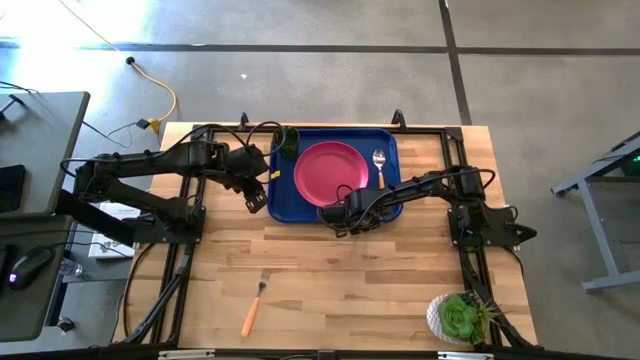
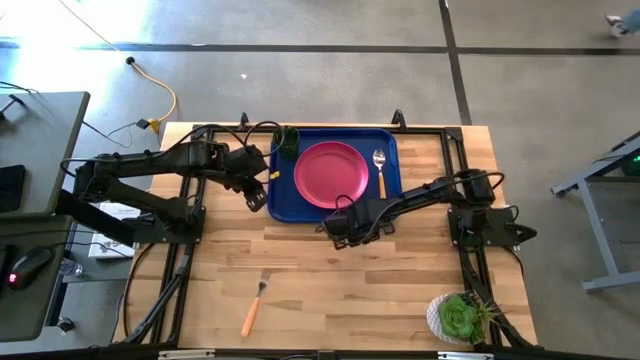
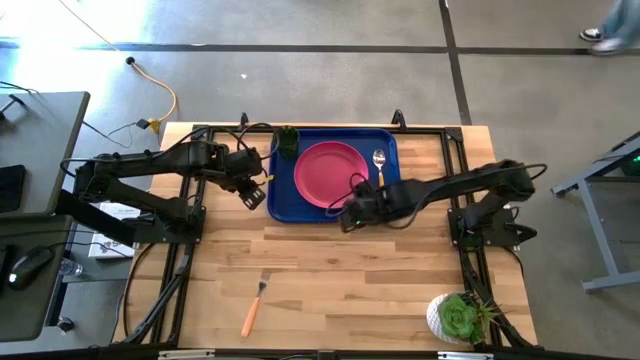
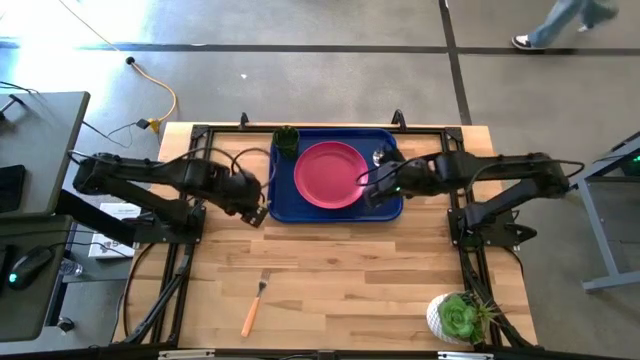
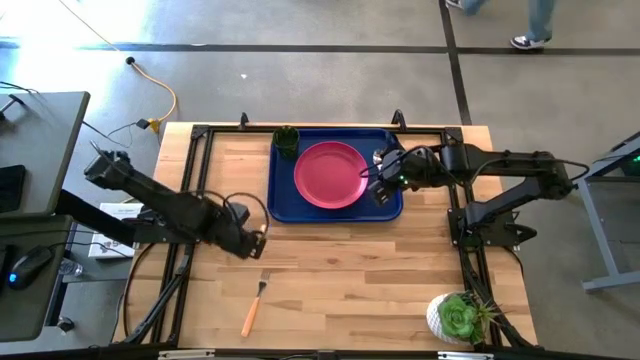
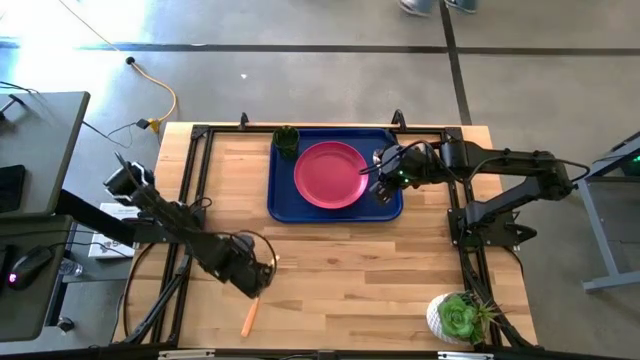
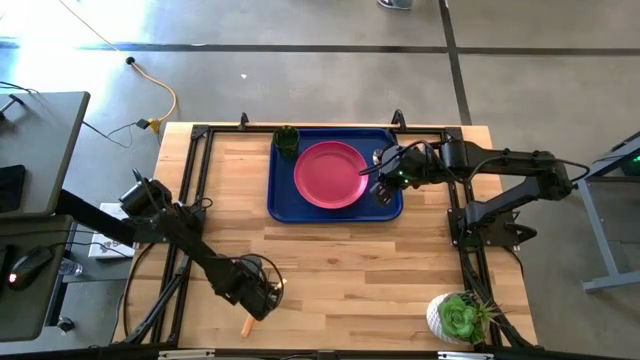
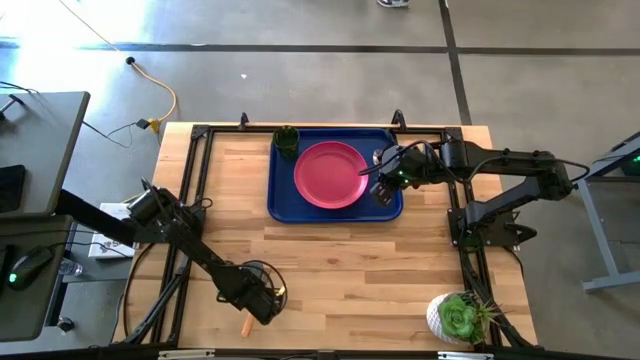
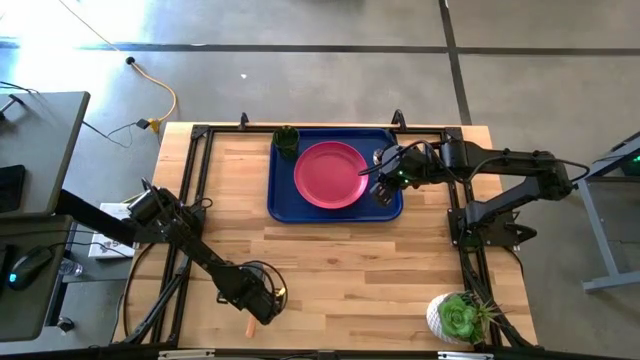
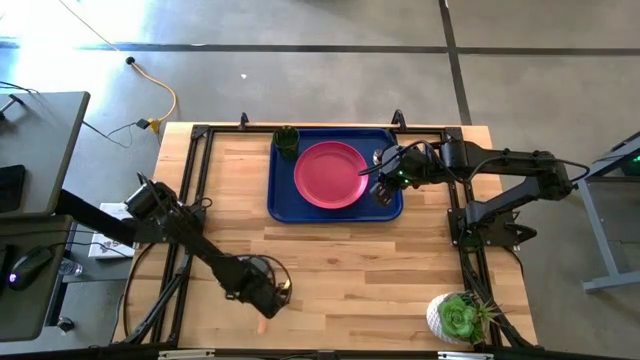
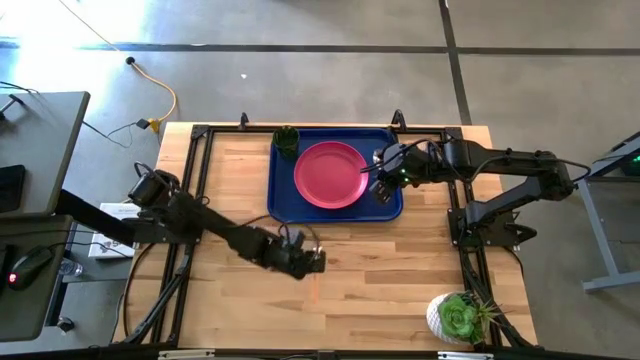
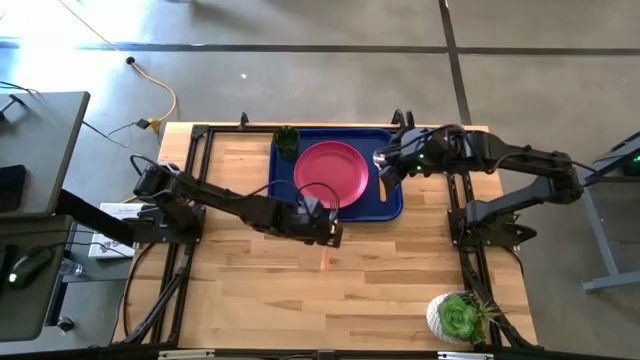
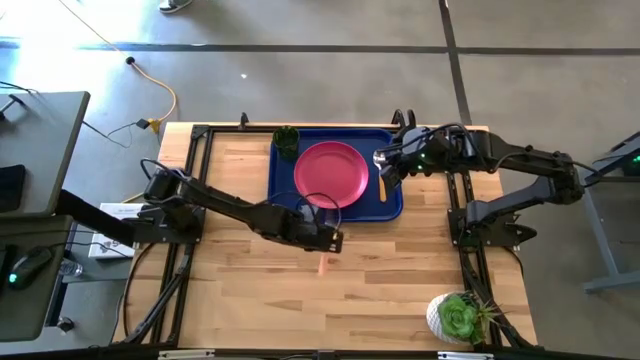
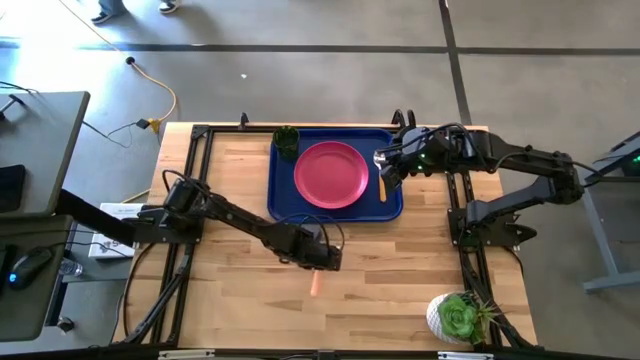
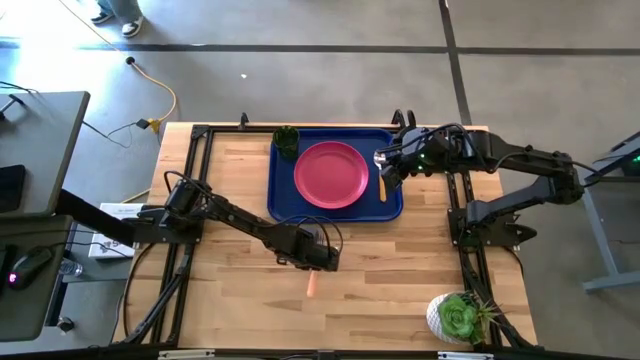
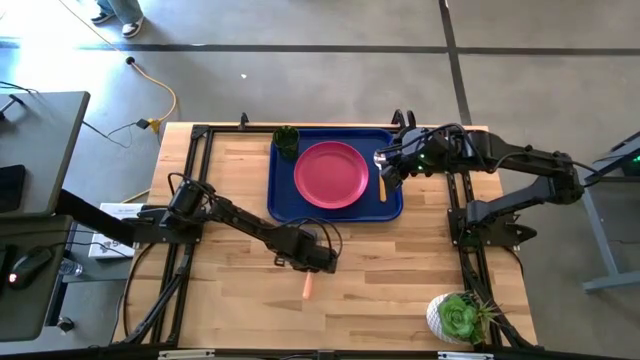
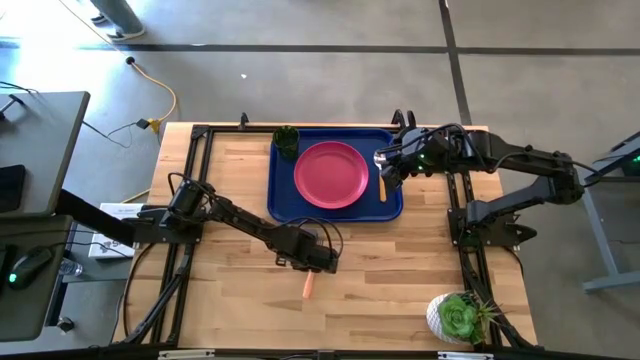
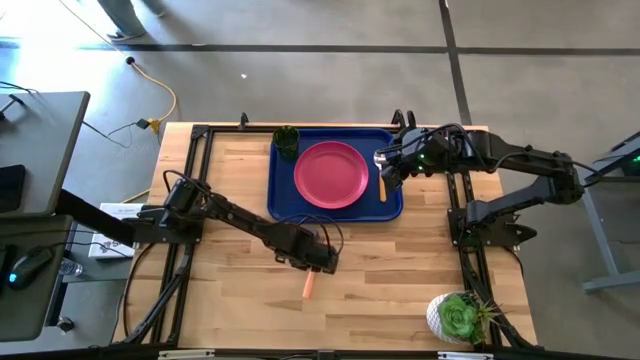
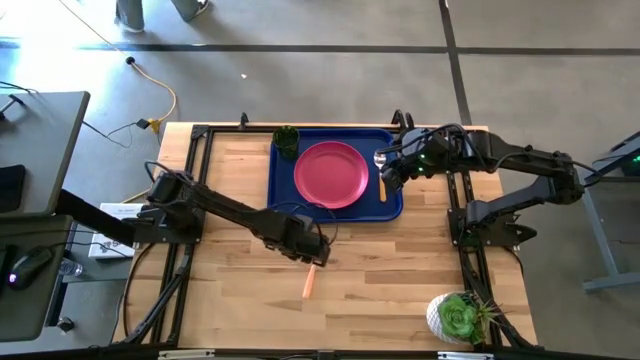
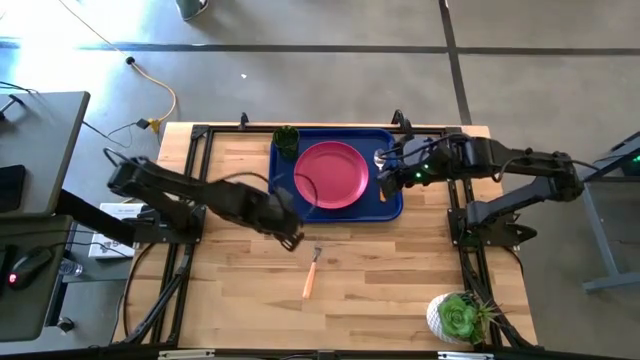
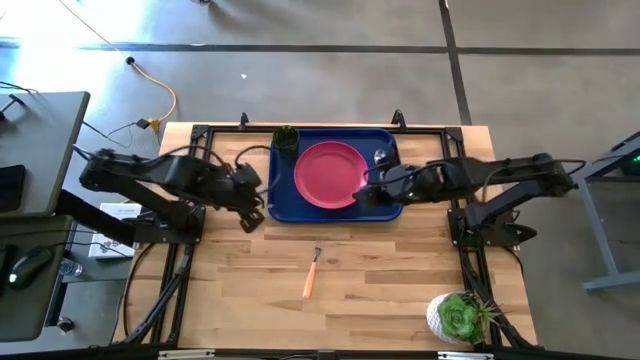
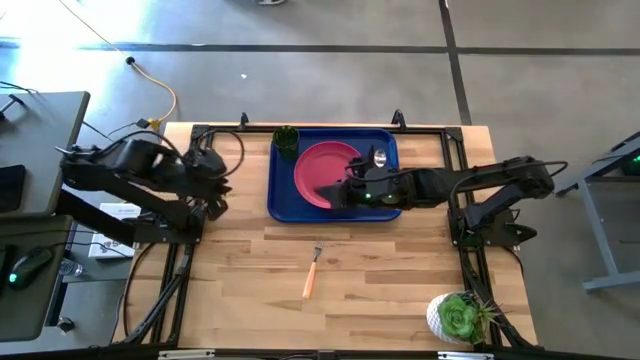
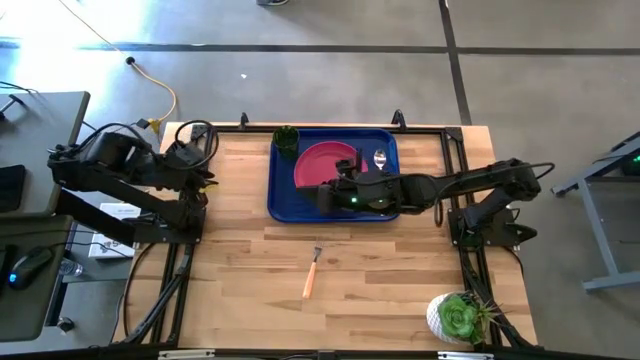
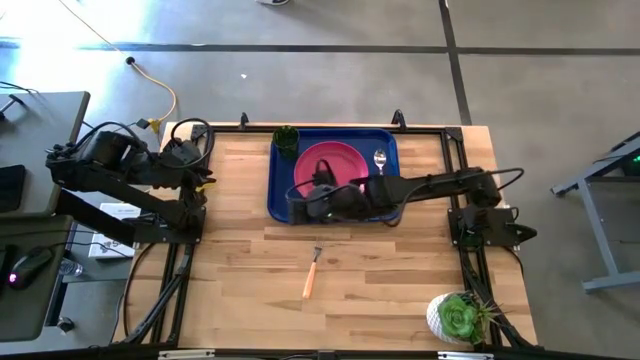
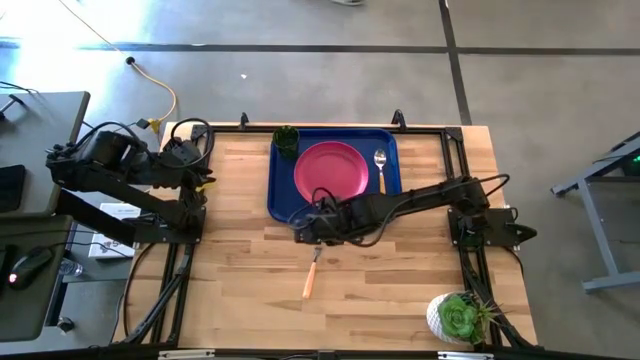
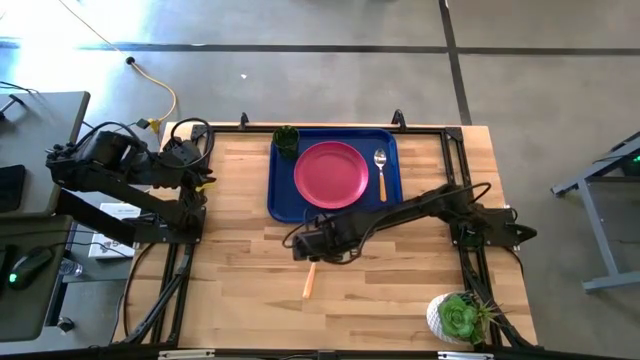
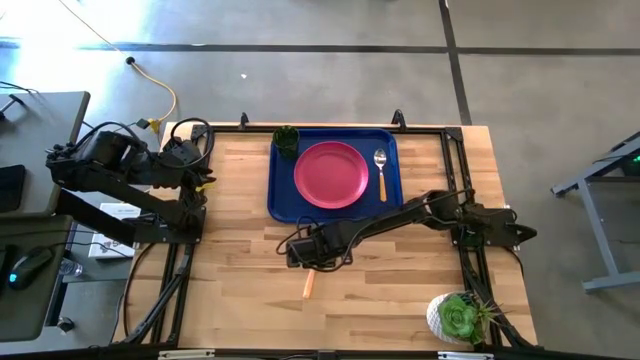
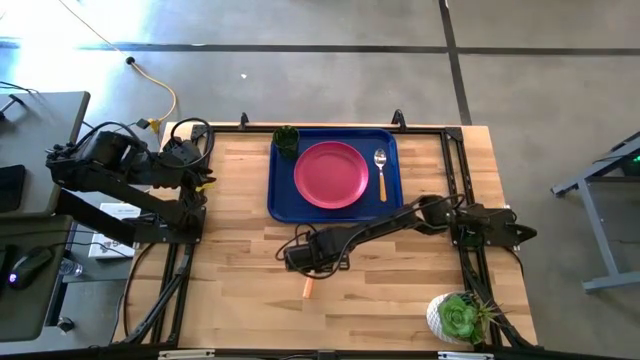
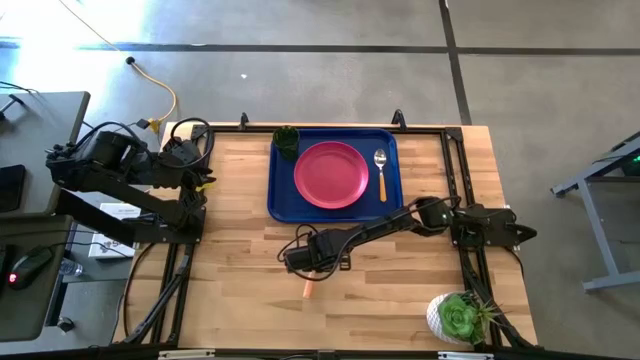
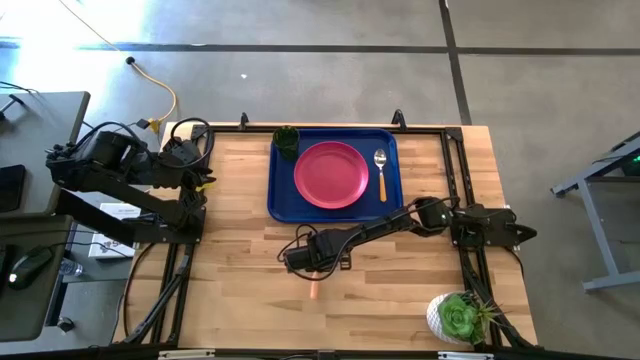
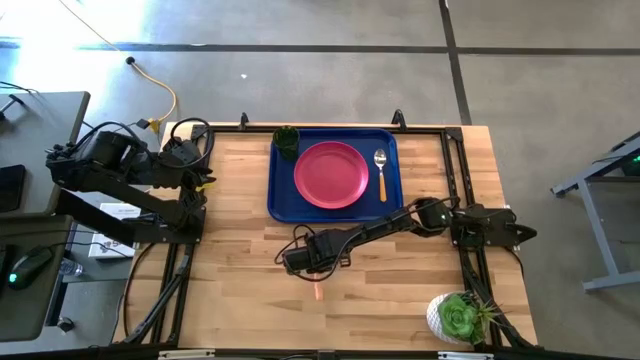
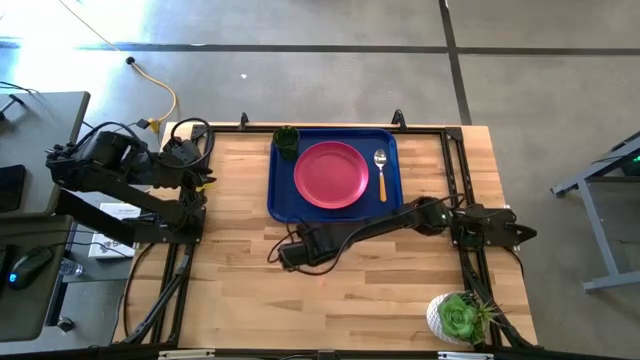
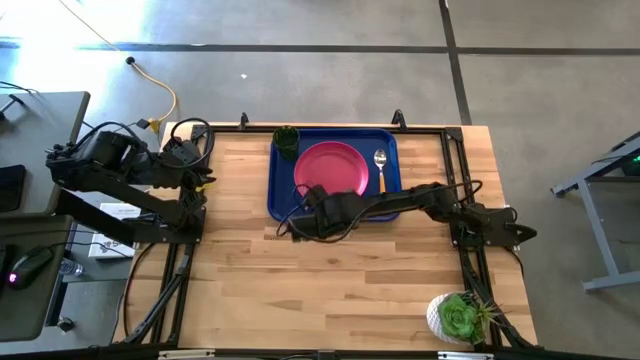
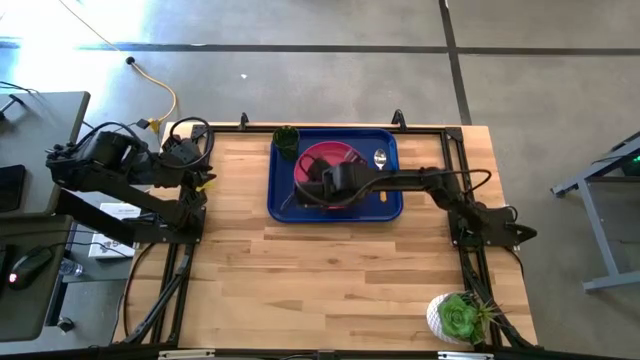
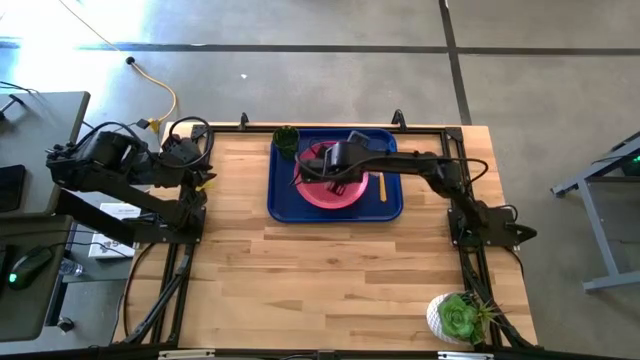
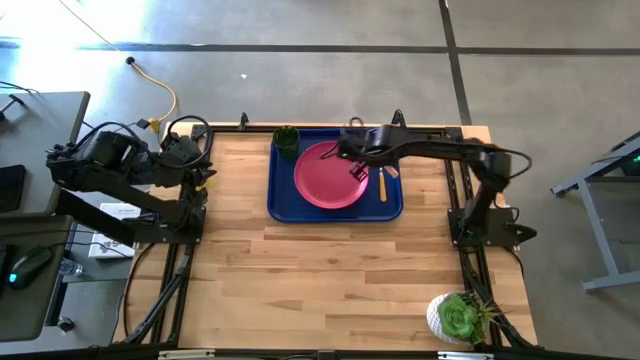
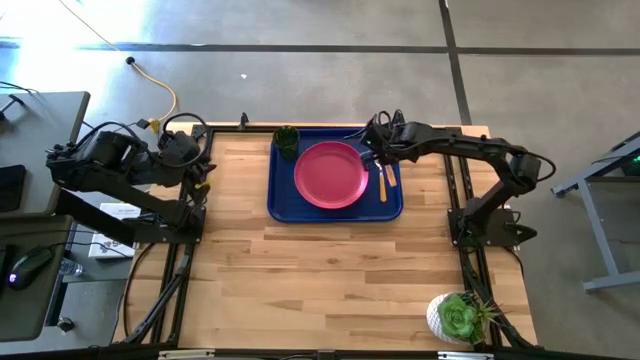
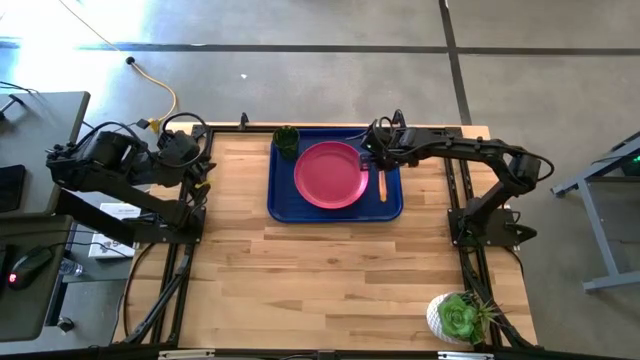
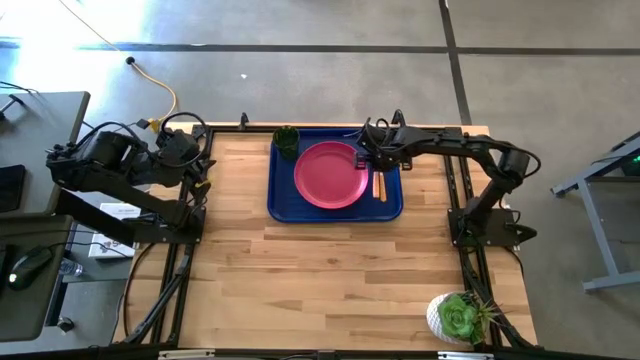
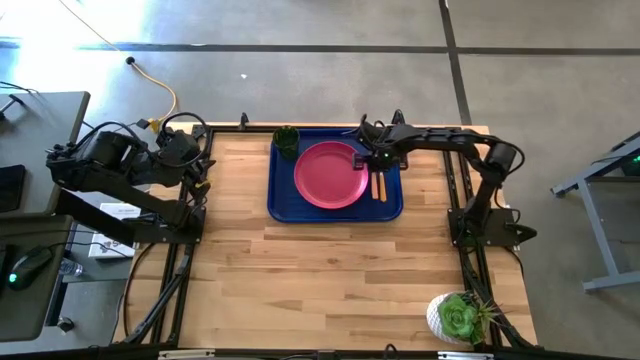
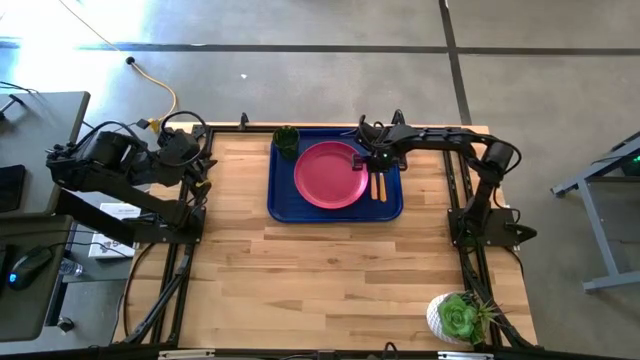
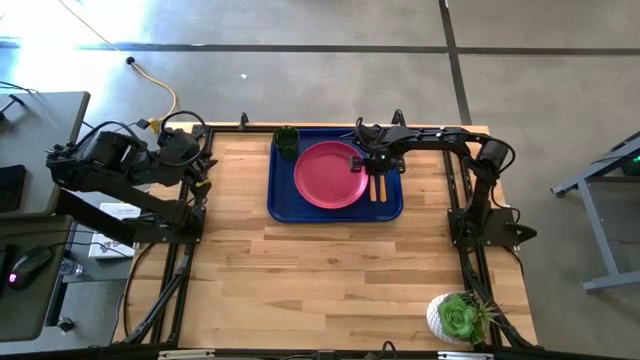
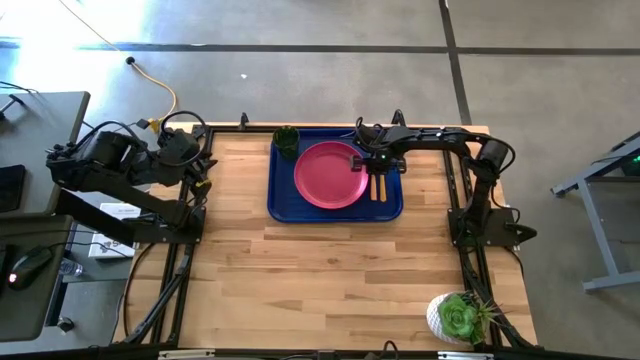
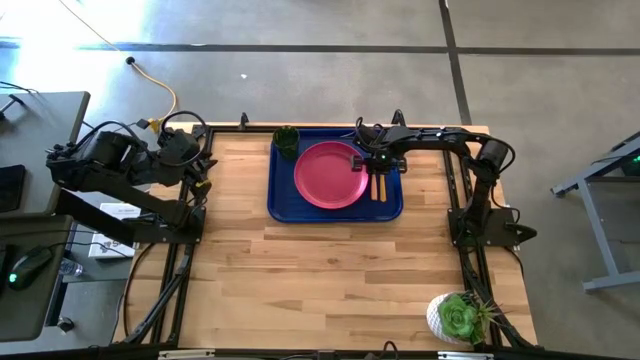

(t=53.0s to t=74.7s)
Task: Pick and place plate/cup/fork/spoon on tray
Put the orange fork on the blue tray
